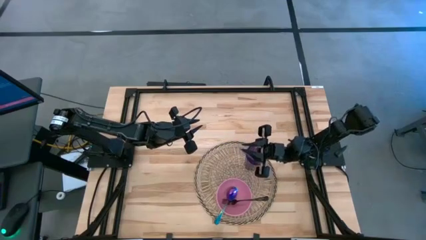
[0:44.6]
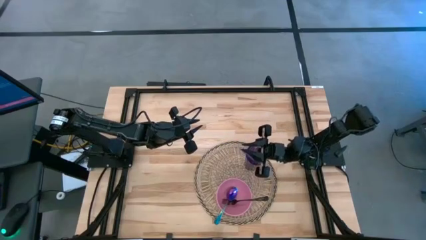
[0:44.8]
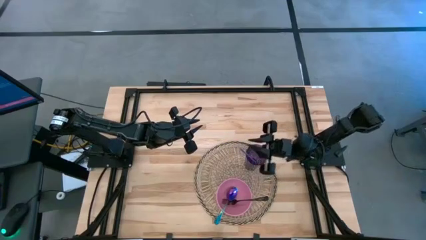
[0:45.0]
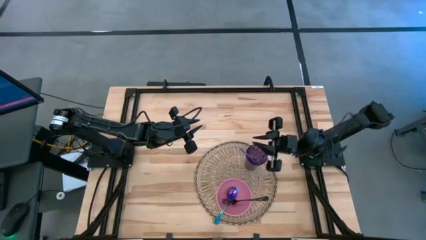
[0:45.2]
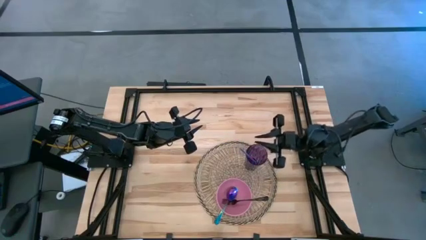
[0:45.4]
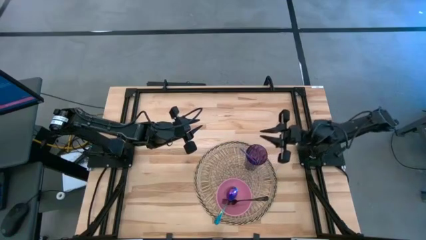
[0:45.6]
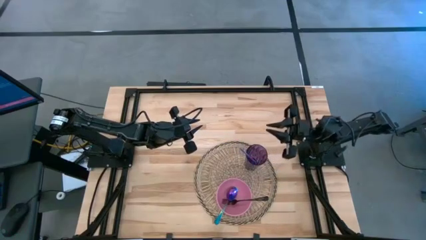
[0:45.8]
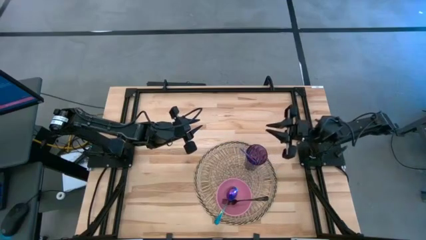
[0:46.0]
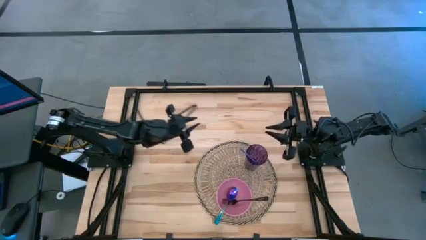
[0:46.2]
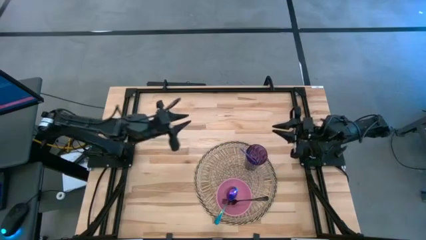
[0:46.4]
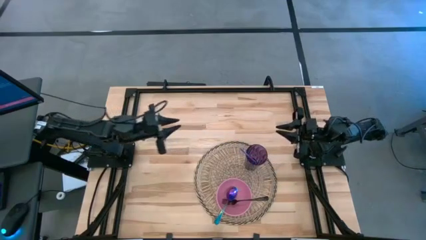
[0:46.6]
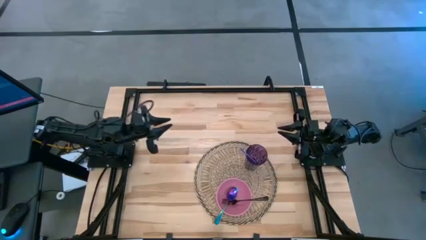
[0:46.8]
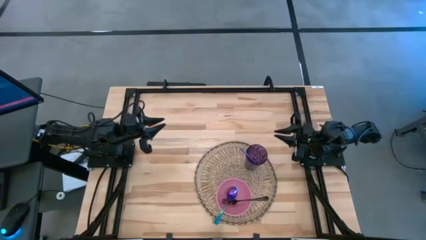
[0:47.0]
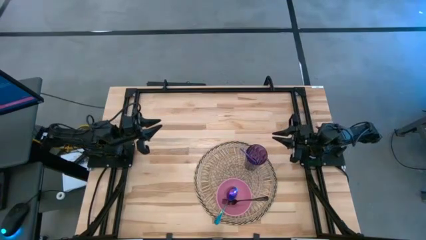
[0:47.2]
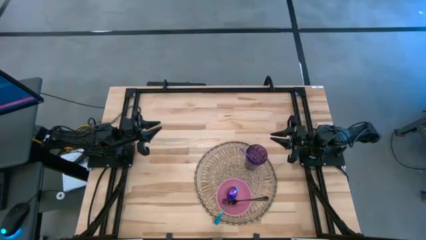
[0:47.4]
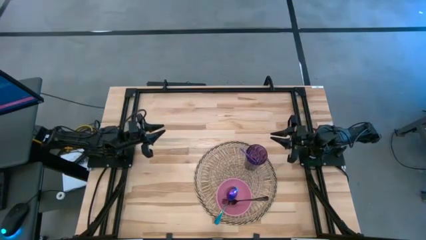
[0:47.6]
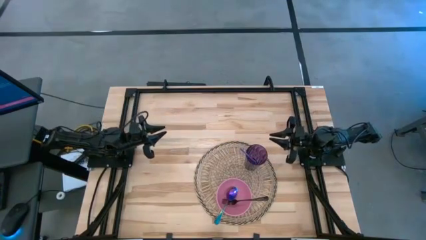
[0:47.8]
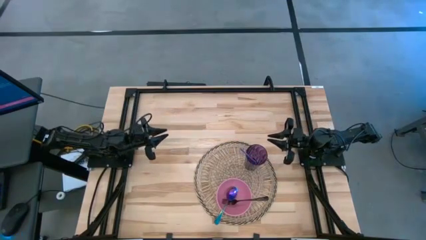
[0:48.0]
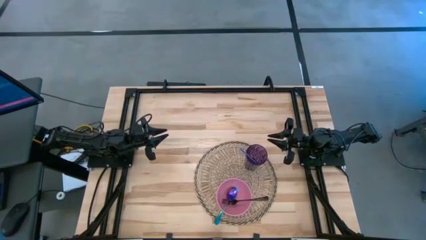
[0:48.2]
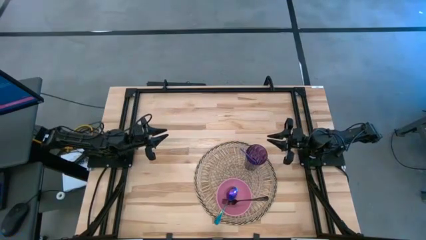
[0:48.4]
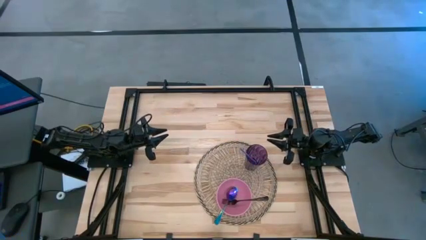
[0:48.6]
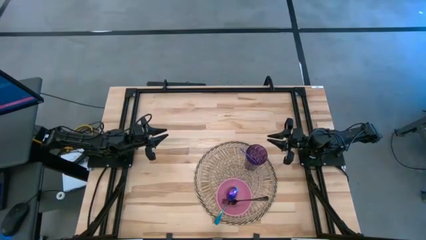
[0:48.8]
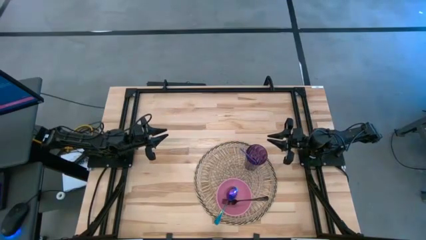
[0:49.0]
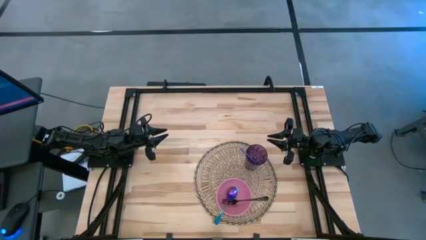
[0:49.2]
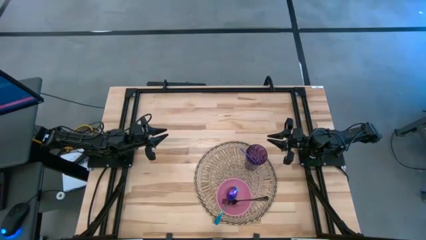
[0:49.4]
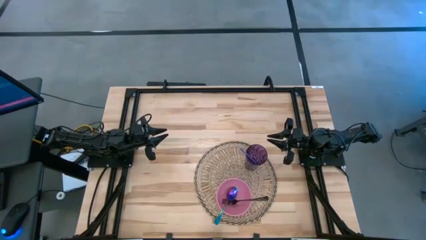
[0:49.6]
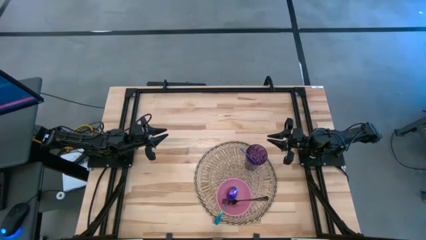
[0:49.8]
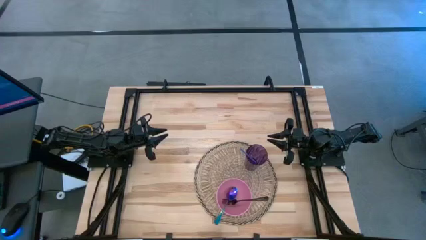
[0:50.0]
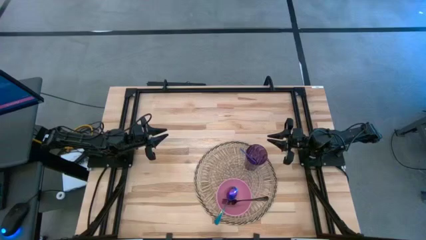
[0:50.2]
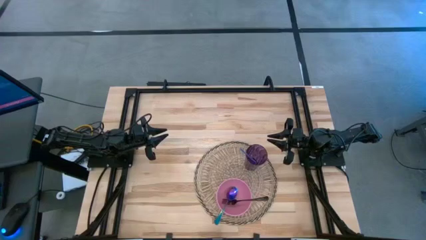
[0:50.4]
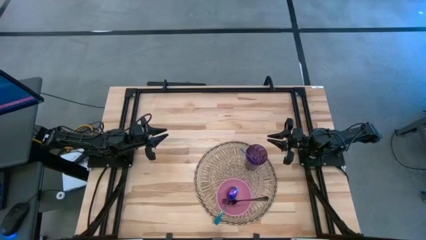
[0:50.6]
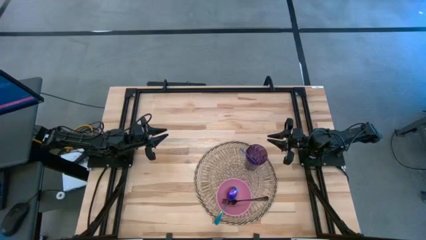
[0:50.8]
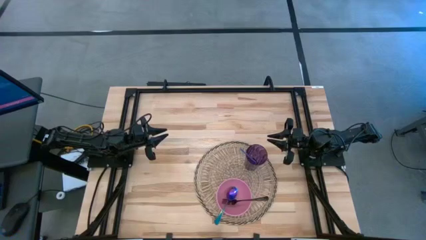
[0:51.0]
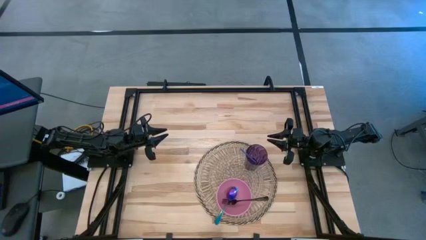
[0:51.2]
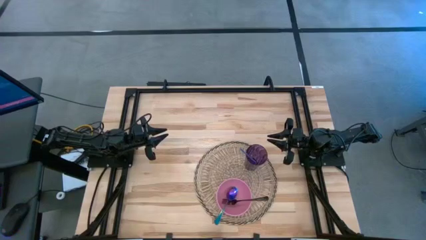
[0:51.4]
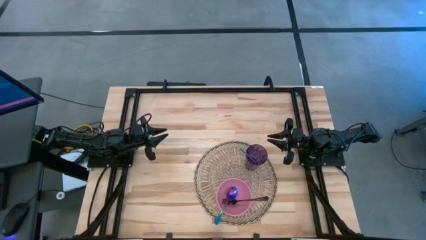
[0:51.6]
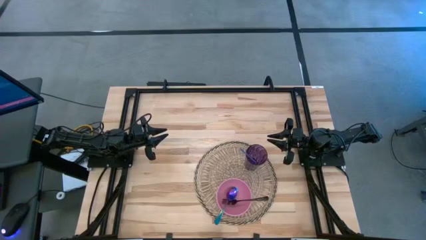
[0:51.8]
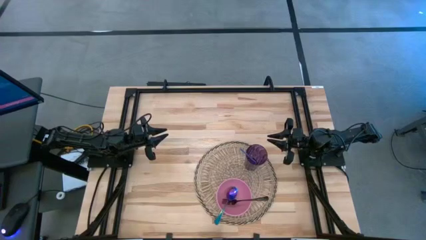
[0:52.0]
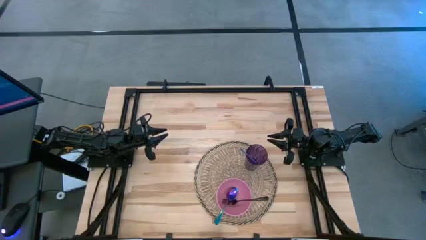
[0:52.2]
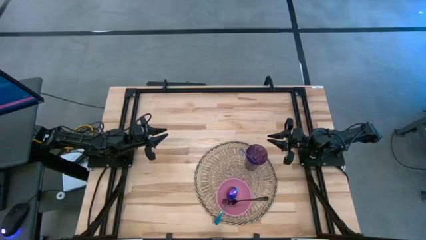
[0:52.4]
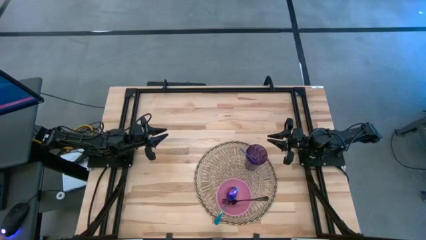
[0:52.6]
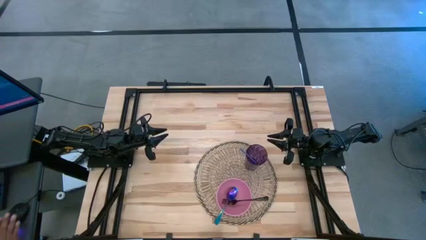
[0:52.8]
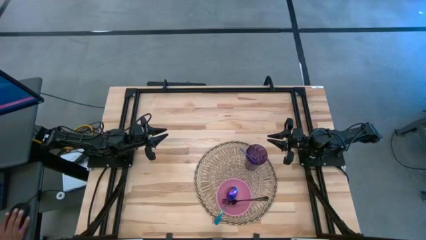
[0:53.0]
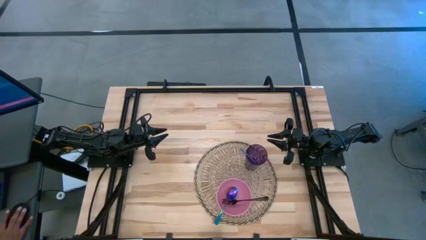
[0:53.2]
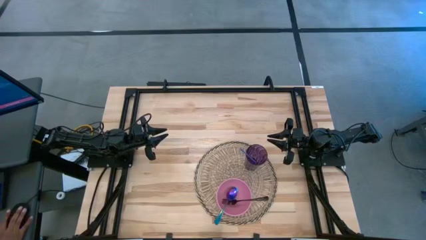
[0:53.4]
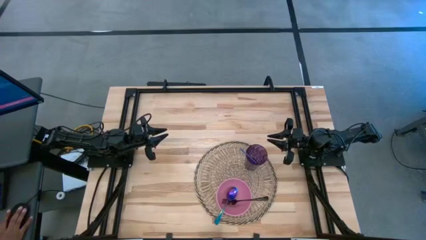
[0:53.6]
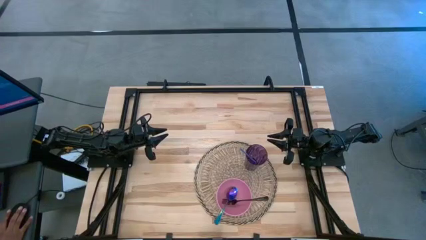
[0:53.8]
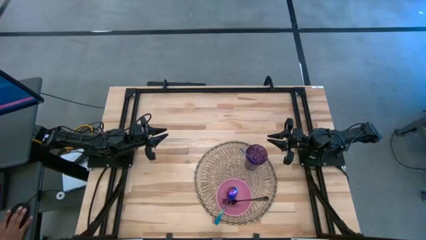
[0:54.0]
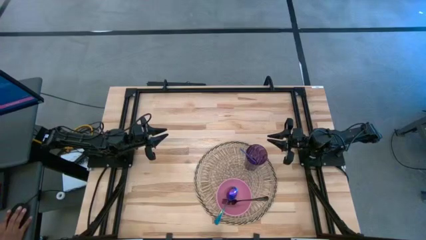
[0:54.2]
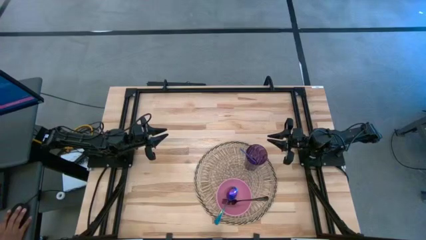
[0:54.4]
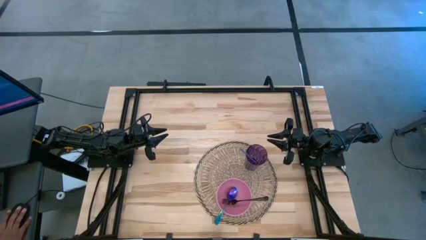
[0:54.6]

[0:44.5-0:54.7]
Task: Pick & Place Utensil
Return to Home Position

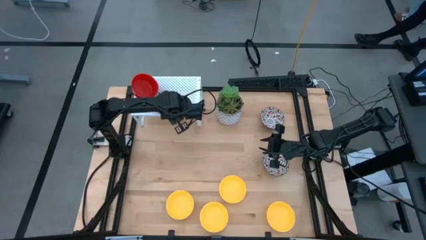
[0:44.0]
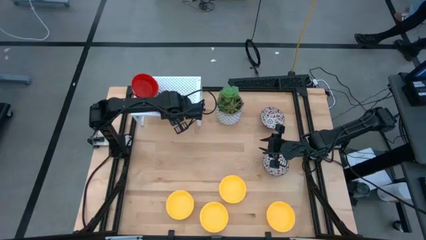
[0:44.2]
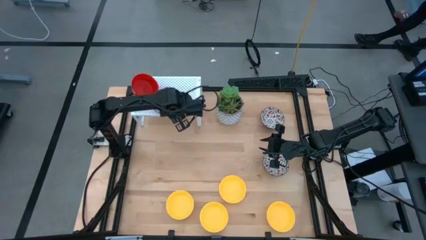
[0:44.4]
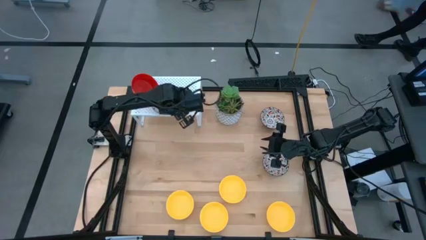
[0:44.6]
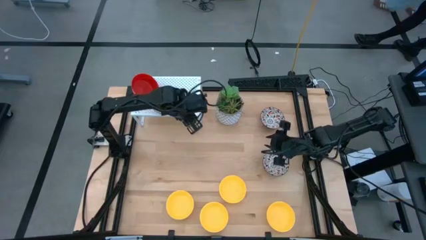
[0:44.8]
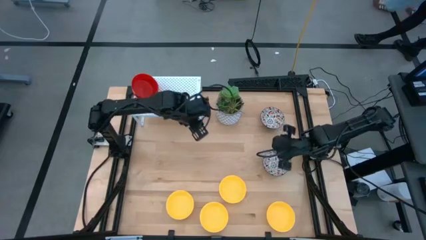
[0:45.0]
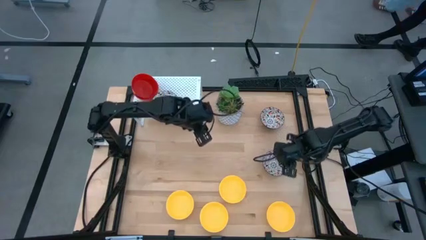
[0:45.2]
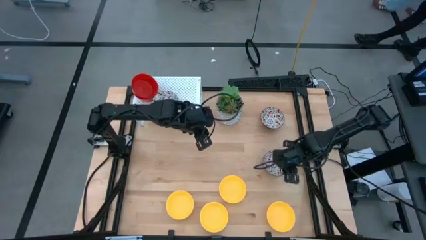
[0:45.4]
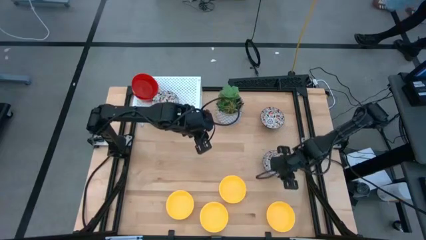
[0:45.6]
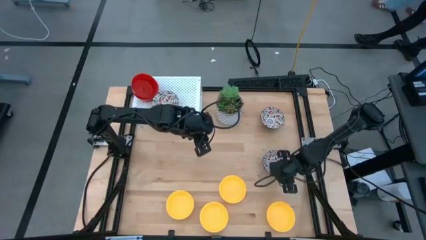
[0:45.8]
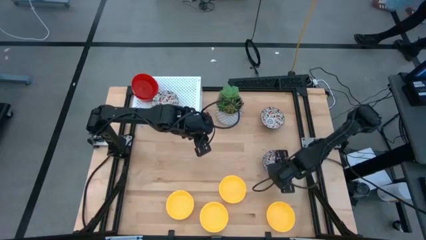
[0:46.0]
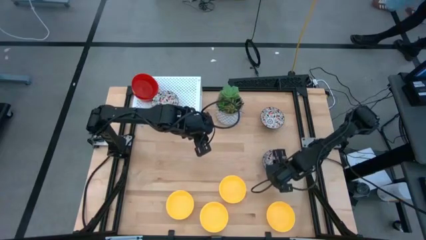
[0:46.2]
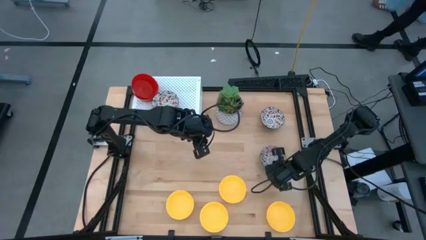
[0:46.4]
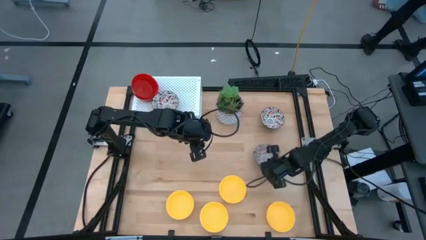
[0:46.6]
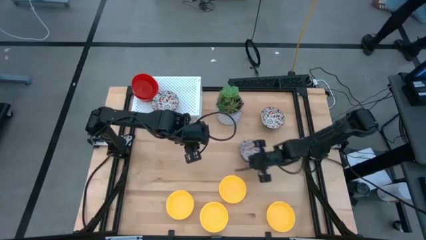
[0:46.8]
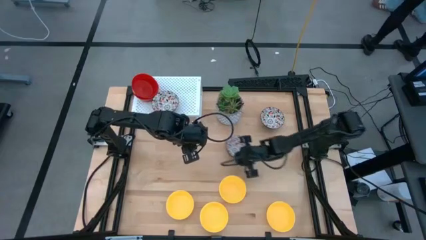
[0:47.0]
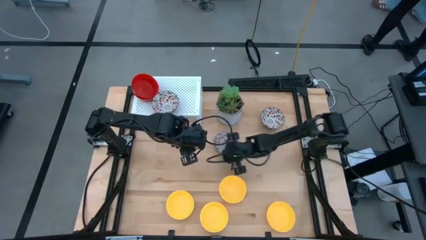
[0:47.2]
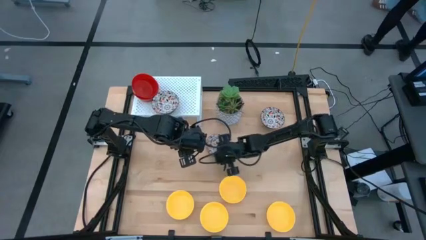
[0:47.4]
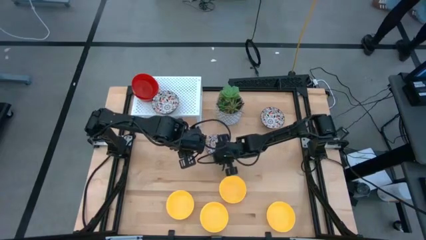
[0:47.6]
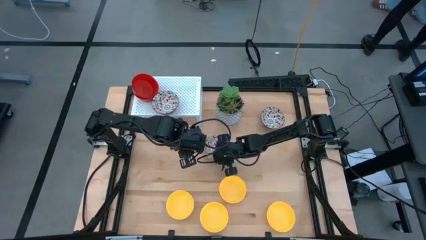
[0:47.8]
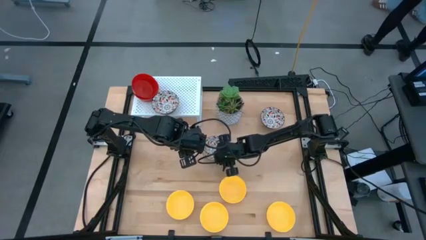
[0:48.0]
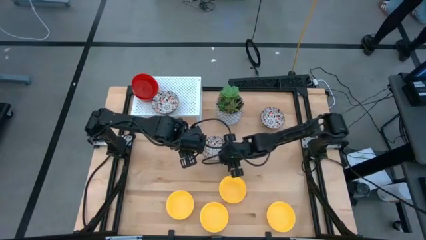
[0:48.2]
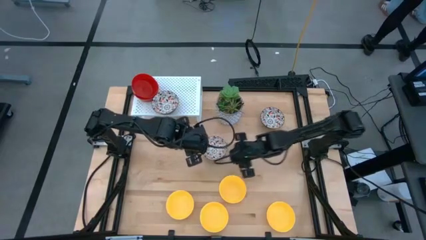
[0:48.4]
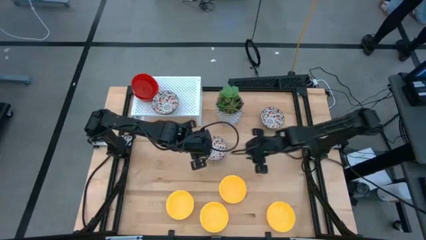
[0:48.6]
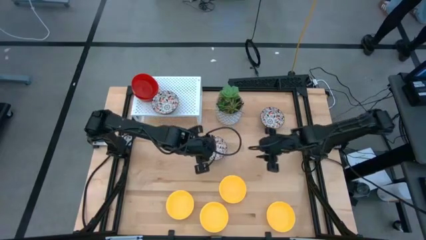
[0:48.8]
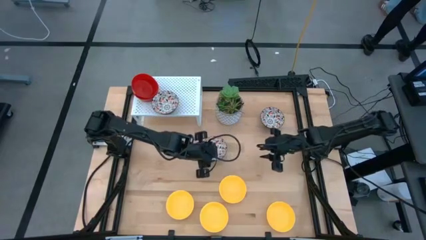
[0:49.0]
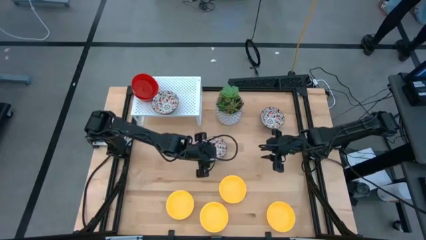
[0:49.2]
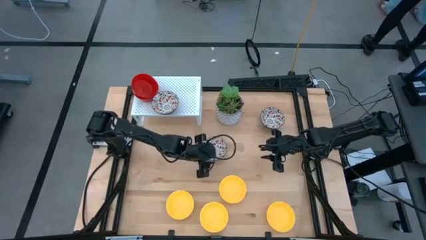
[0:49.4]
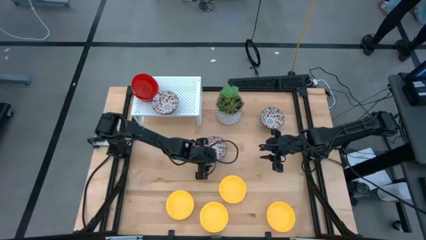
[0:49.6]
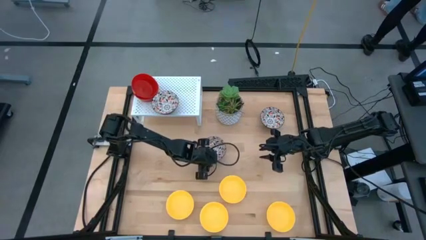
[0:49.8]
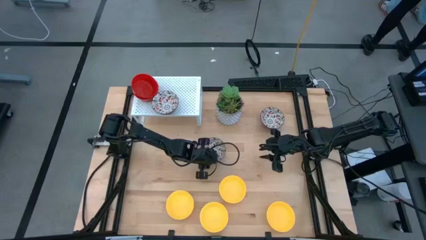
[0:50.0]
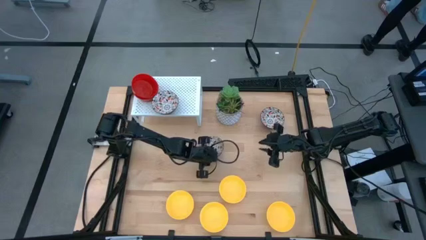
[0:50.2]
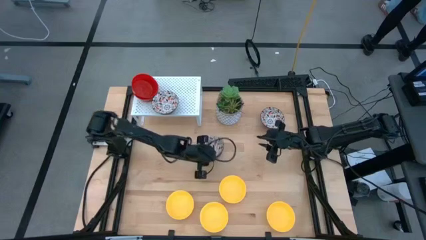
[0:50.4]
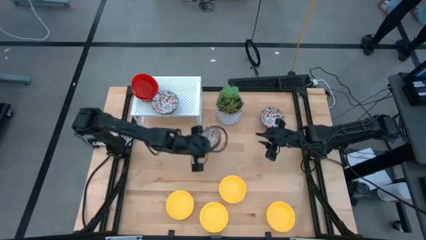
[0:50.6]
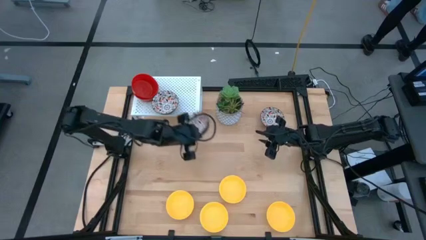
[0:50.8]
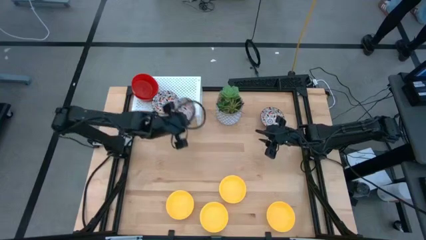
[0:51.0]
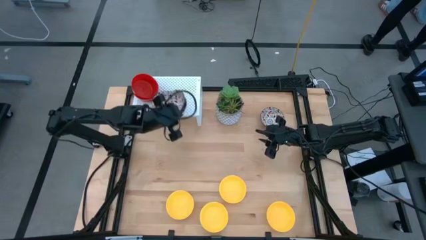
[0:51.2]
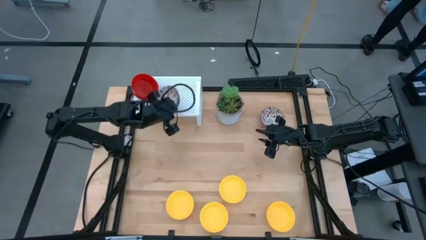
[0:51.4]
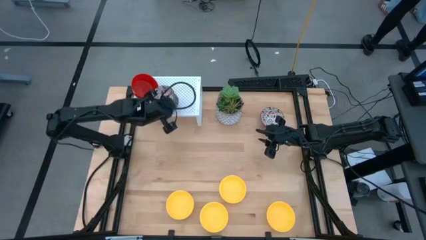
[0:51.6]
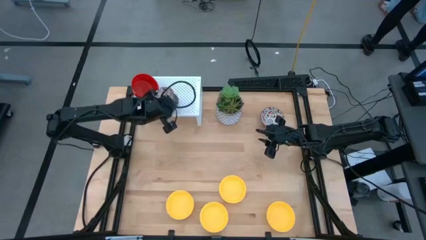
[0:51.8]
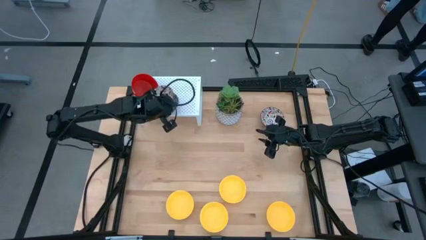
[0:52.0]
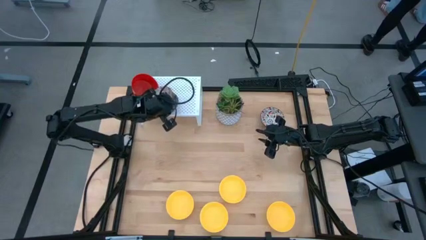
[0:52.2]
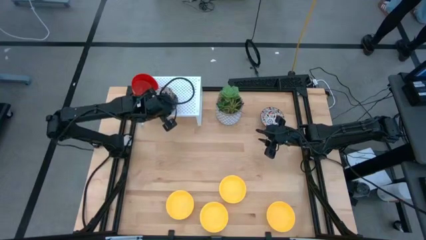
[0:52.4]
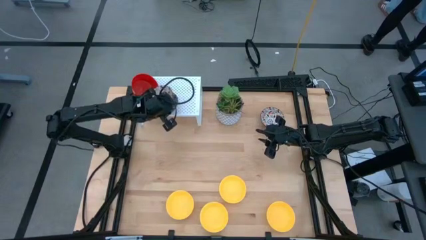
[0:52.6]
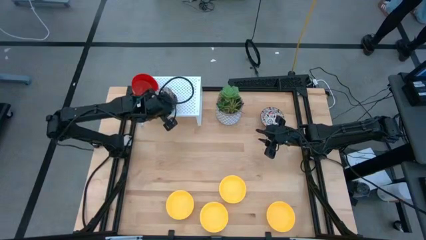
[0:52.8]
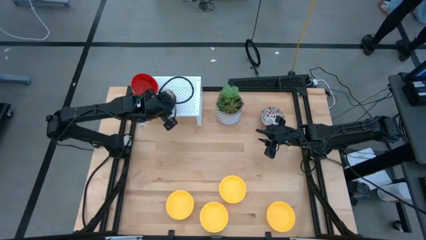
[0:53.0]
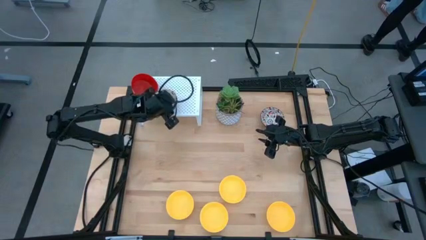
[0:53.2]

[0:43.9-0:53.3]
Task: Pick & Place Mini bowls
Stack the white patterned bowl on the white patterned bowl on the shelf
